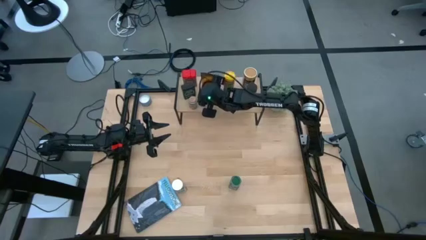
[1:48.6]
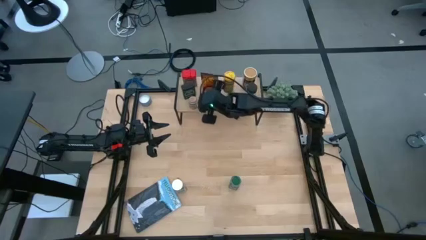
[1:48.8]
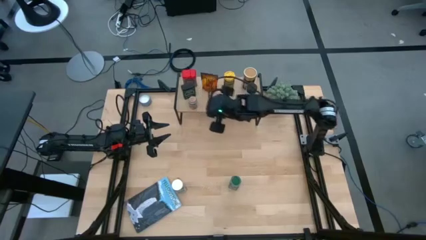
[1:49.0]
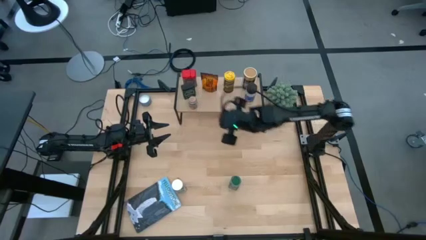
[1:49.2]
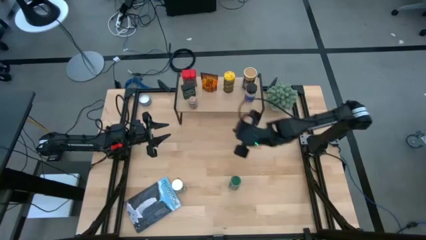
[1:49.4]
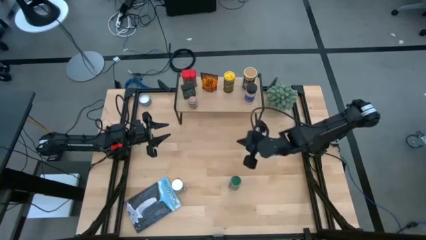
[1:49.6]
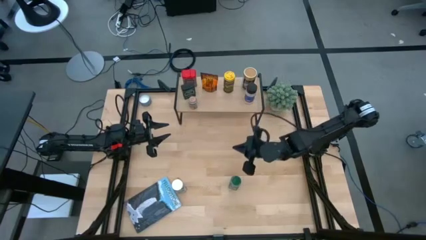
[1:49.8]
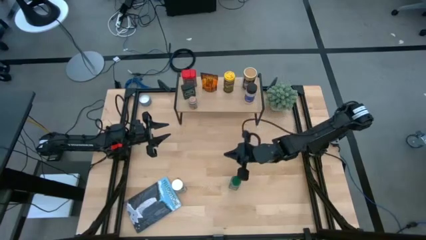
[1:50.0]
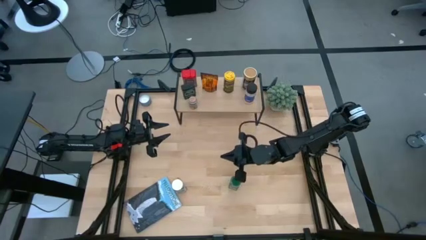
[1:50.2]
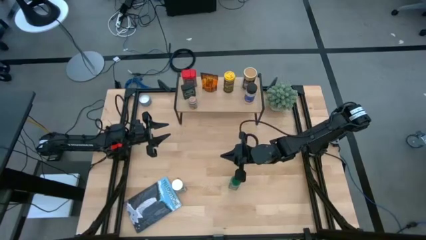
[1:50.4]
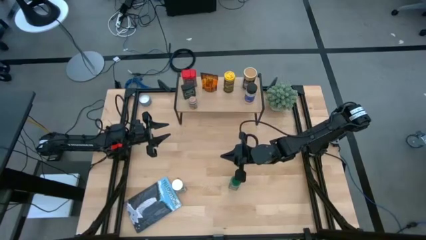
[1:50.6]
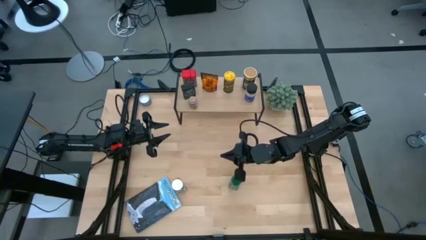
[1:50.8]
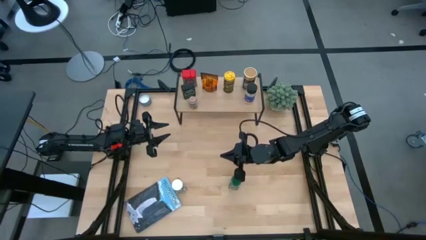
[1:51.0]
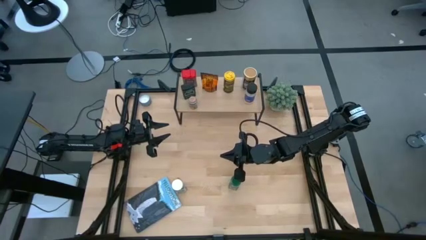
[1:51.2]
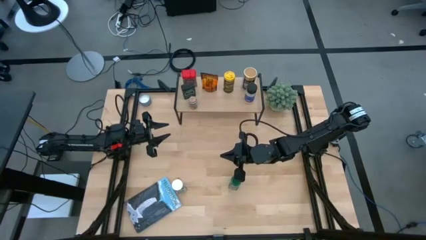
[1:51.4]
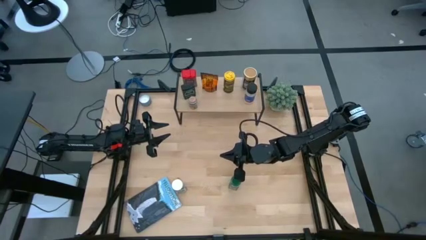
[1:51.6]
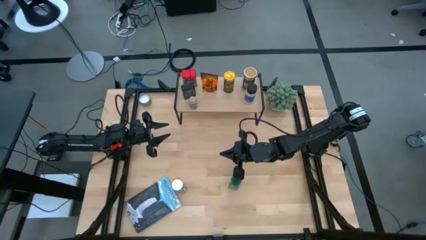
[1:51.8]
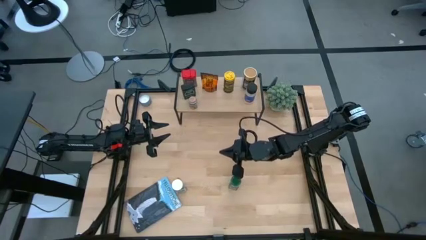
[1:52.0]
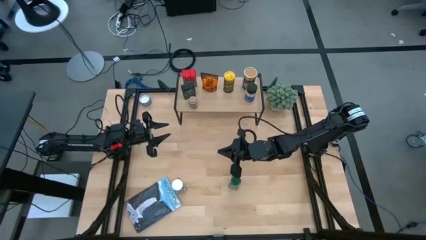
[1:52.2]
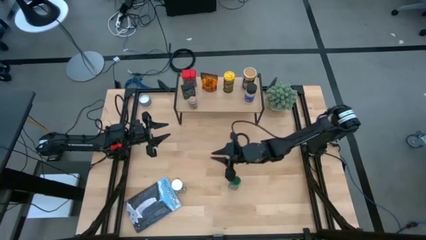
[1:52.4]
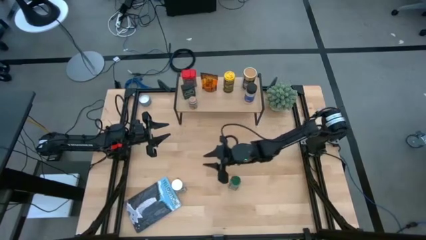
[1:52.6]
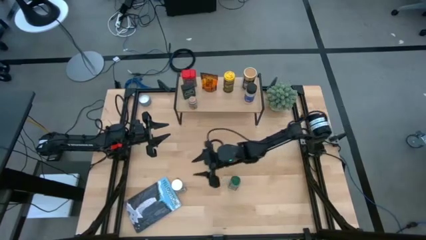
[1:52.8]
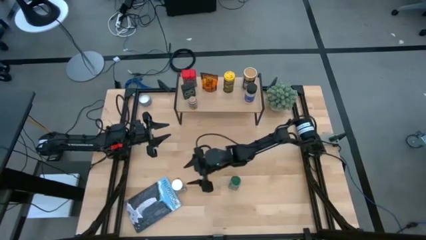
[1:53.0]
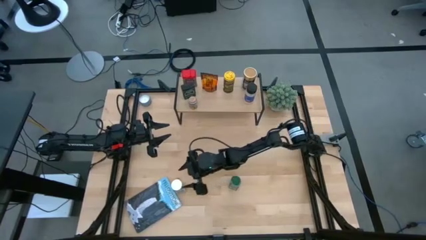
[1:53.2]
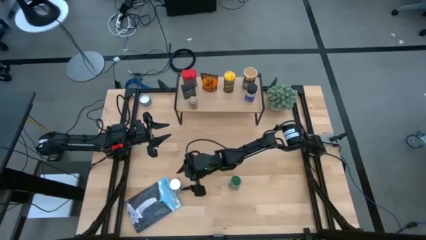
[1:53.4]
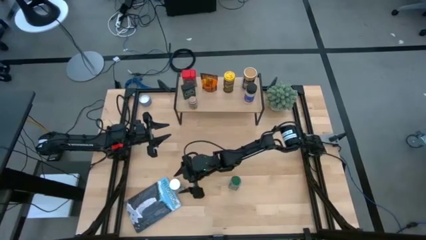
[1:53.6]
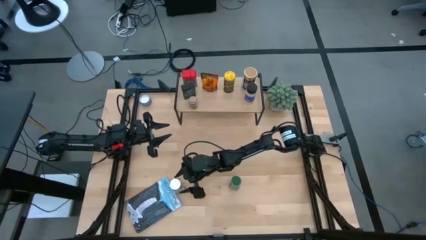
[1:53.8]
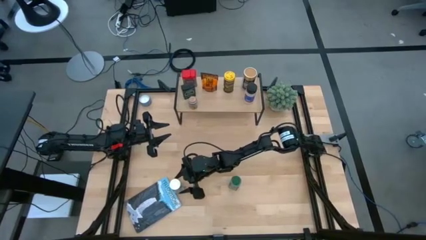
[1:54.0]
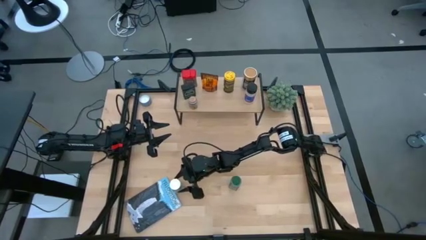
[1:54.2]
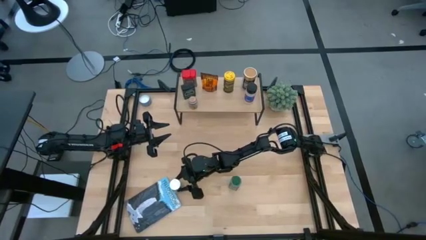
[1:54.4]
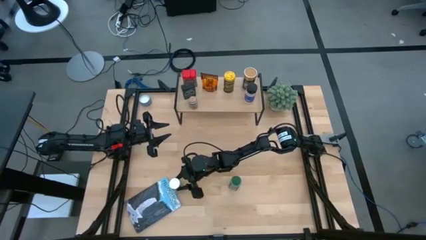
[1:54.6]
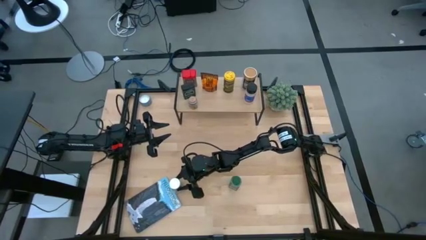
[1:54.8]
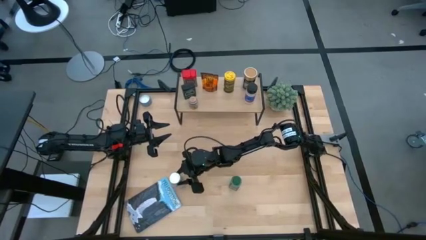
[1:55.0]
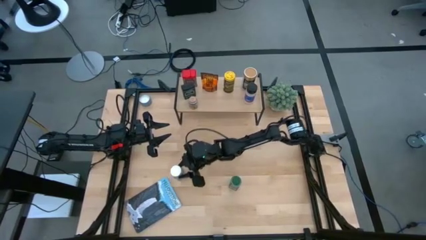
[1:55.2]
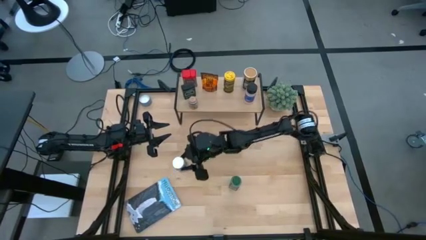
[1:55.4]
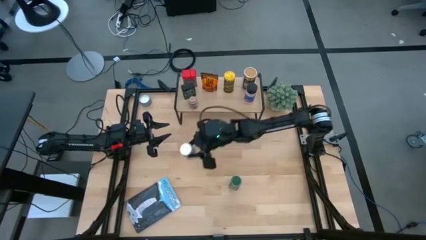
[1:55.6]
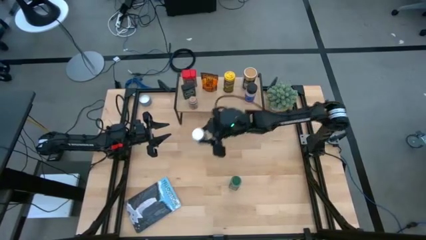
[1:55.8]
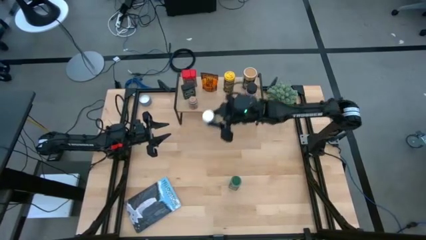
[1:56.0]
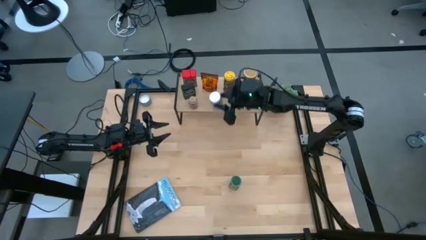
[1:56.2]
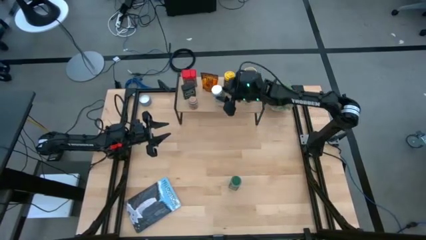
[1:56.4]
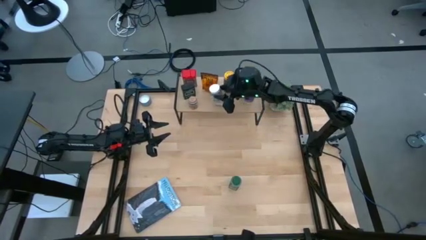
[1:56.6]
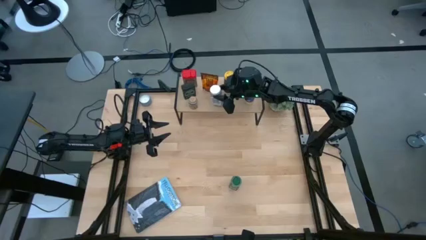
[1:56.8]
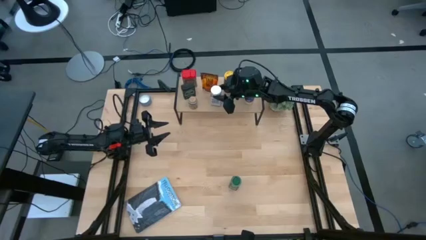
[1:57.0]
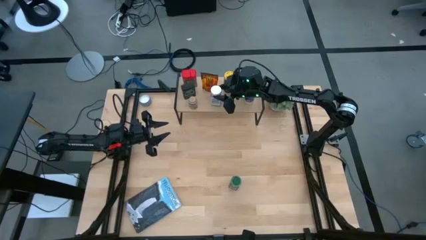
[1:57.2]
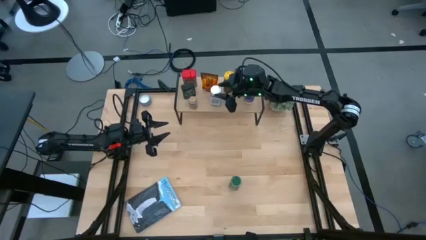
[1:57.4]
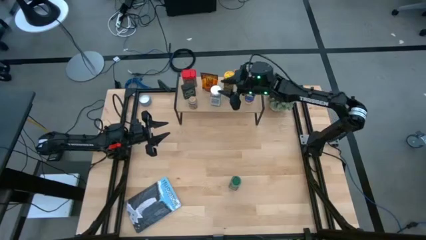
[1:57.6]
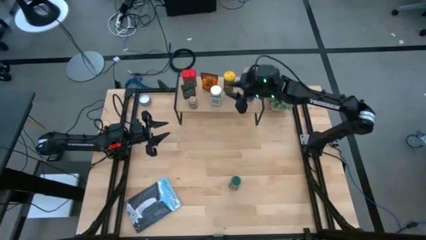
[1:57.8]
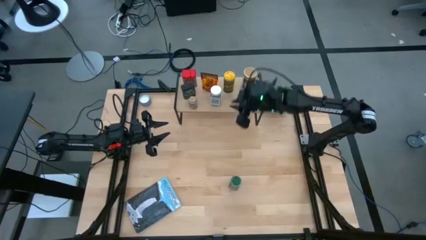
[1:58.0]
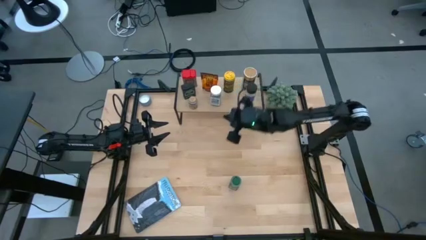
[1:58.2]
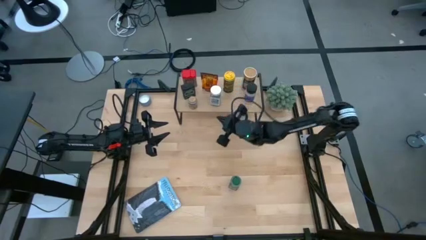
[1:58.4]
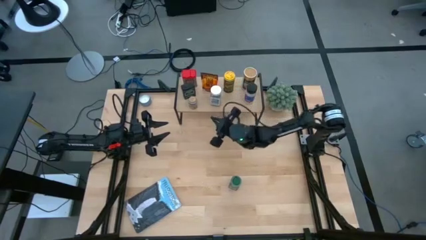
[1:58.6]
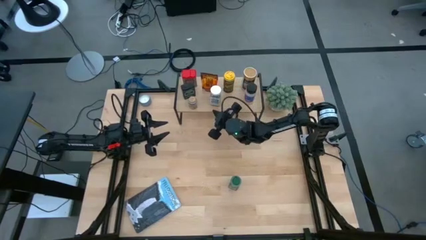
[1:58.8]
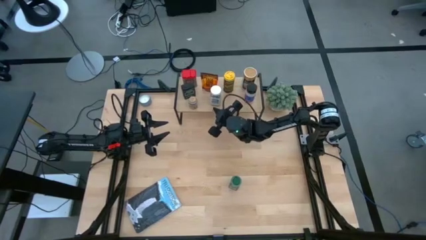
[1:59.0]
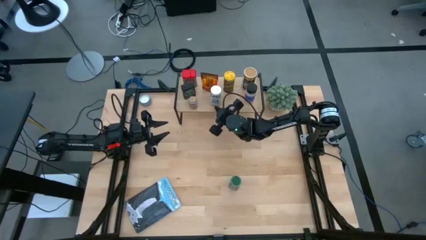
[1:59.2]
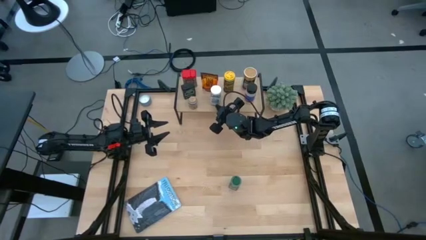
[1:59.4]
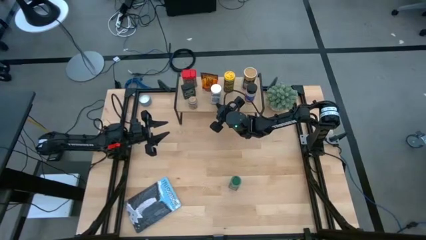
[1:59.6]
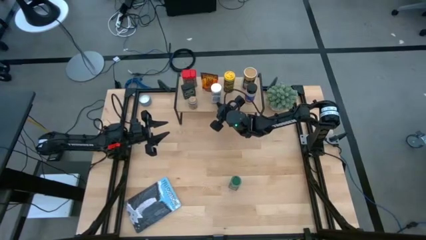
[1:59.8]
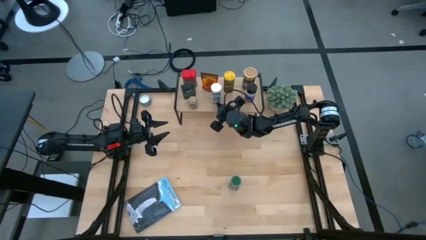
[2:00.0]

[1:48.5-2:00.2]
Task: Shelf spices
Put the white seasoning bottle on the shelf
